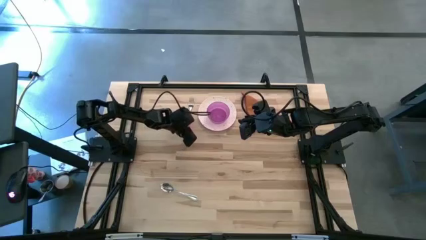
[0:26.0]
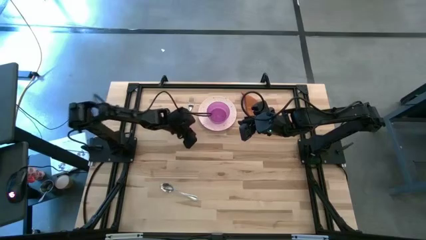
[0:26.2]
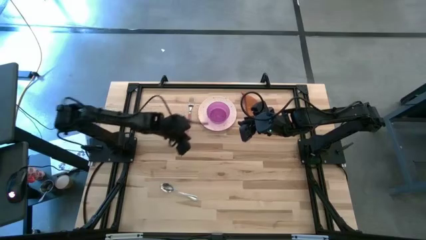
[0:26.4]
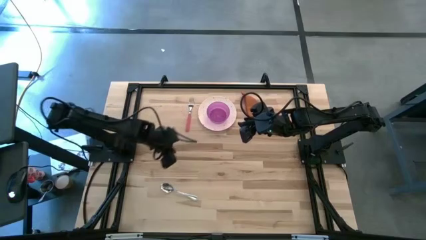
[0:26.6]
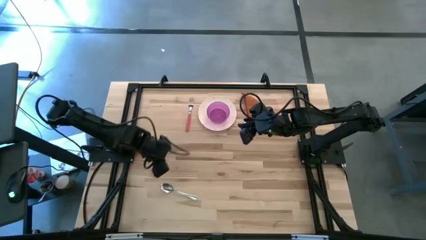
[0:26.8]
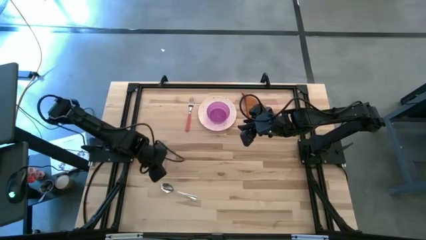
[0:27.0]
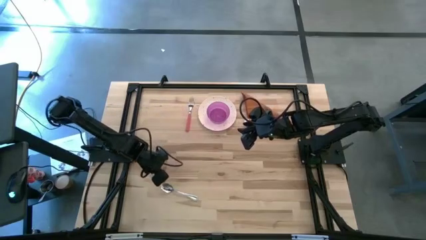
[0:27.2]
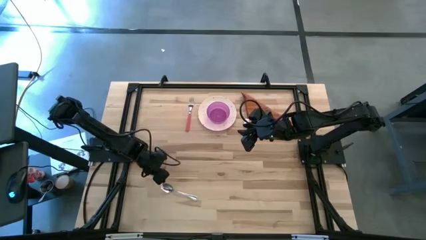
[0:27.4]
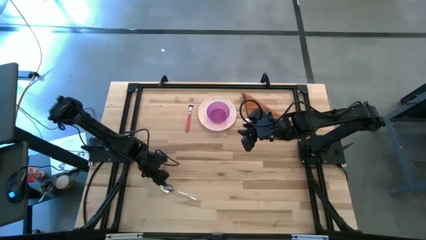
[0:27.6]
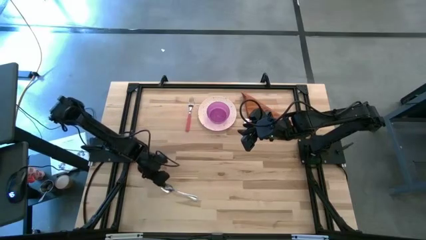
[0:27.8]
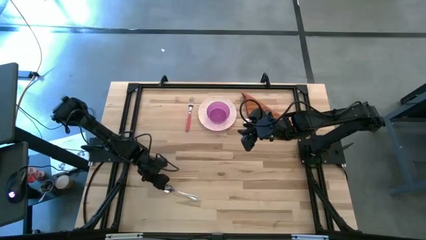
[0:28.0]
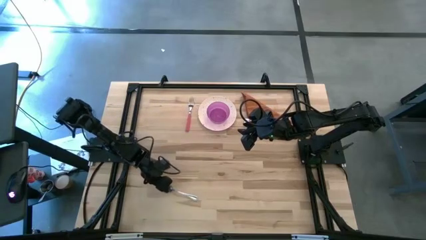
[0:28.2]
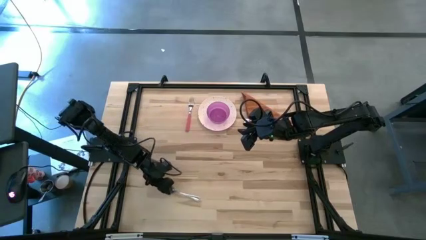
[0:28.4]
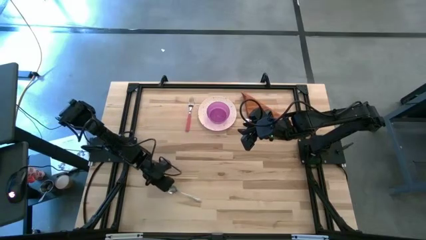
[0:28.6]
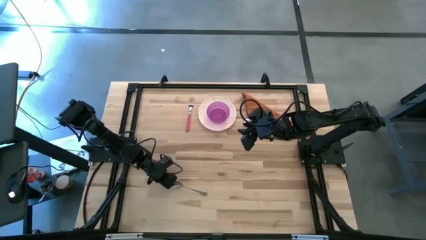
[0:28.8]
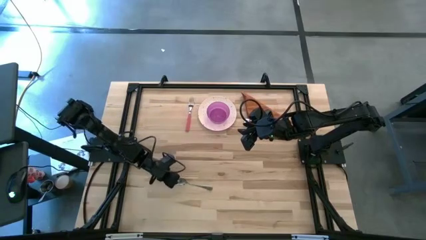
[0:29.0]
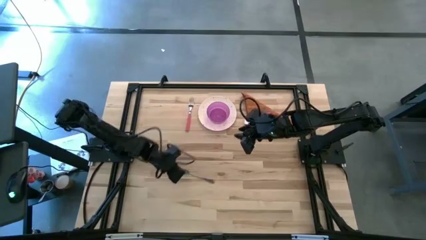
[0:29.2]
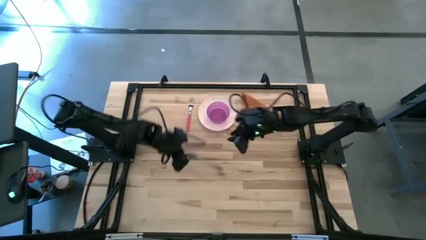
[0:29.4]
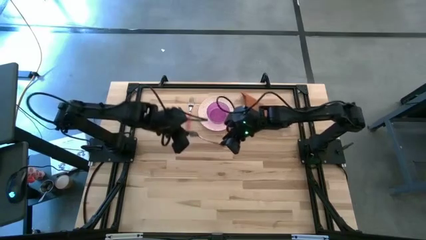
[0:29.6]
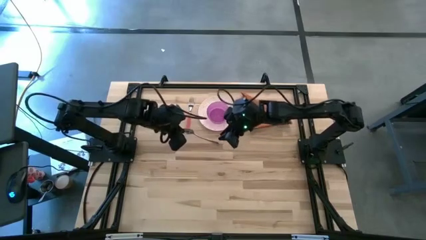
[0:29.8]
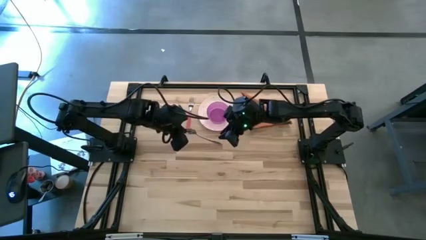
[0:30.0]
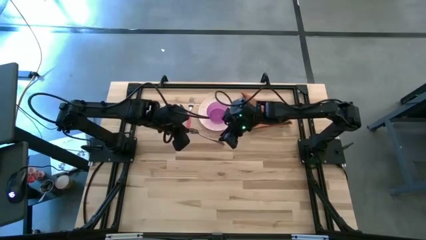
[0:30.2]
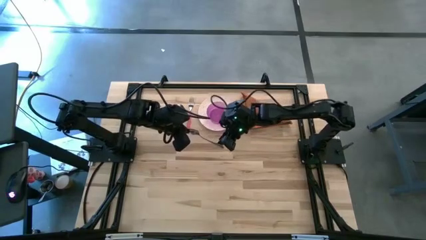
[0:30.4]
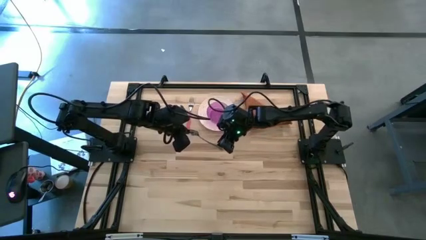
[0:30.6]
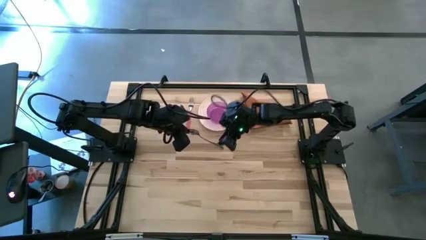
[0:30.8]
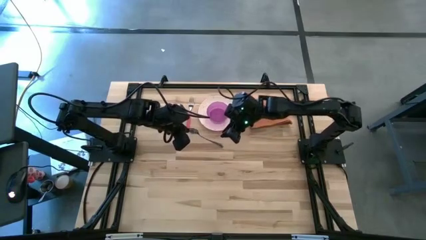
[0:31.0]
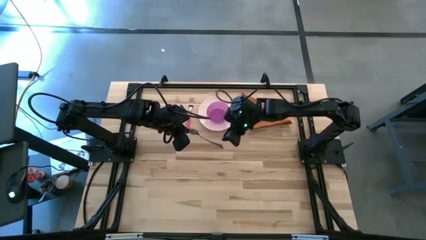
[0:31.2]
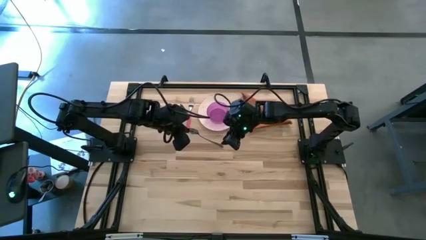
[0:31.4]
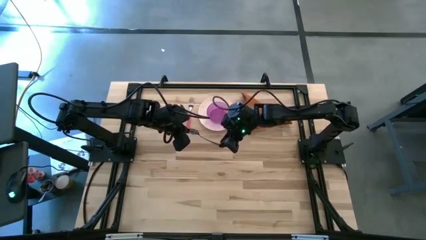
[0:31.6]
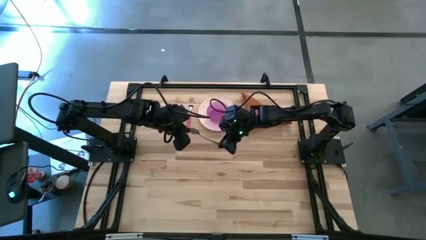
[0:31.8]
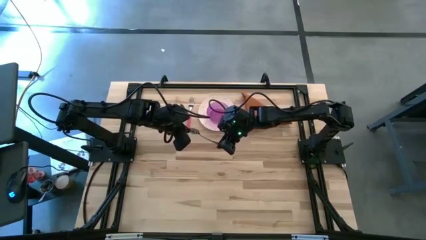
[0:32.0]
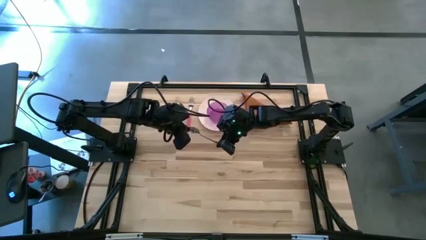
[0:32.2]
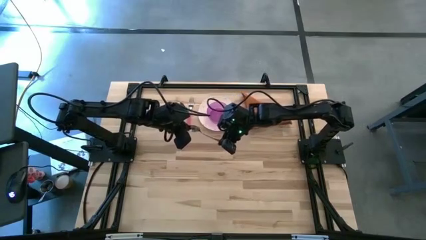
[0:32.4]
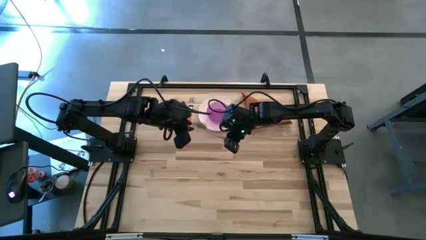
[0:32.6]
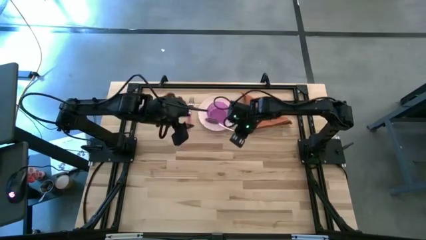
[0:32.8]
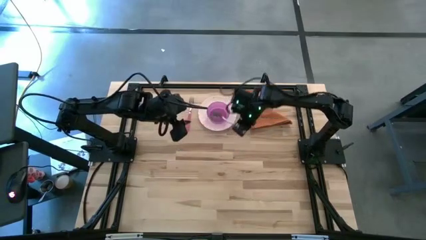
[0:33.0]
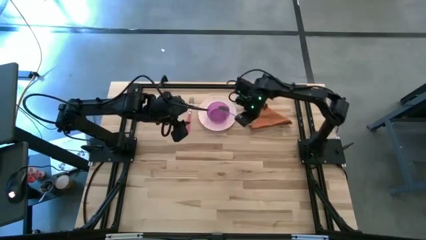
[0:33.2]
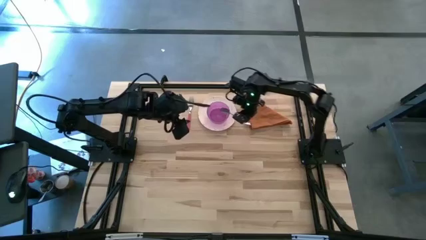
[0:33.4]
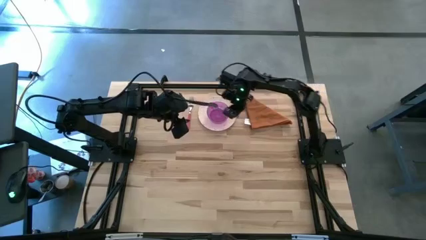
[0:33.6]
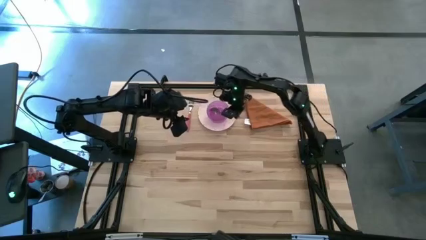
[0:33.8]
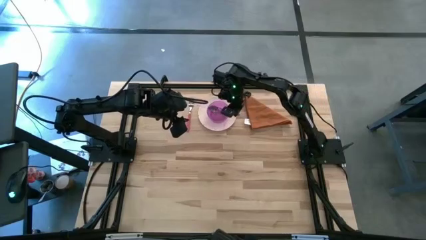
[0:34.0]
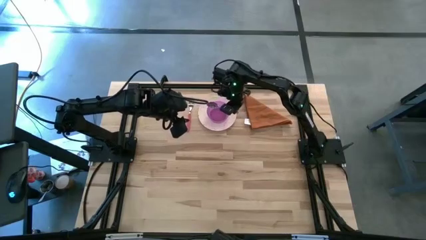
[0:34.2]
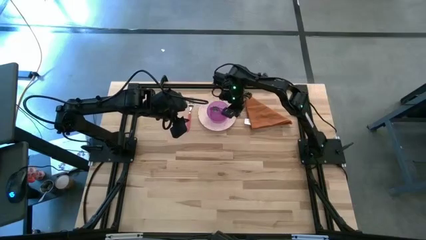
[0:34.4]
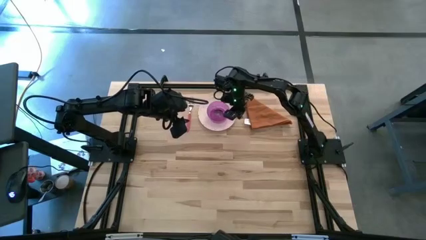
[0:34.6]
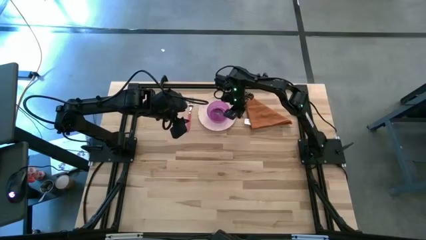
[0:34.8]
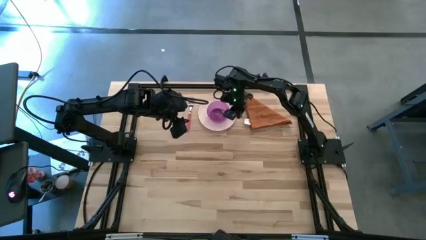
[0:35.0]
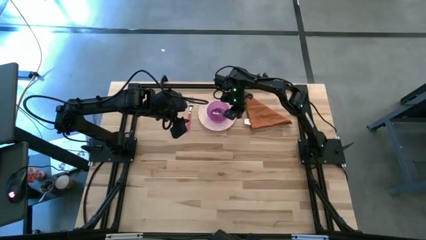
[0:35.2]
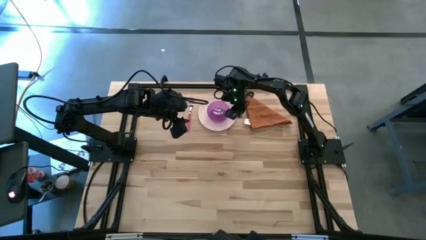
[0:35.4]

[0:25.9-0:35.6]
Task: Set table place
Put the silver spoon into the purple bowl

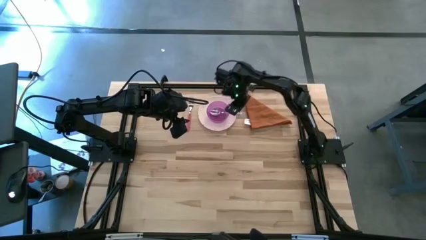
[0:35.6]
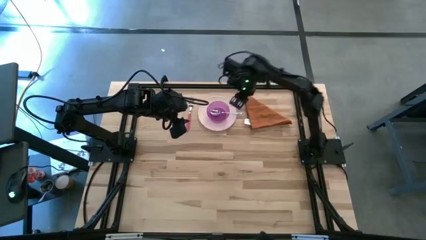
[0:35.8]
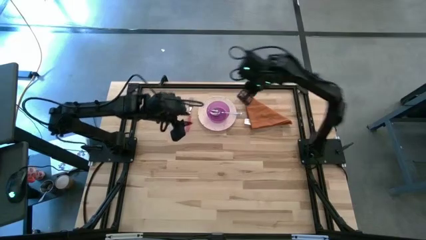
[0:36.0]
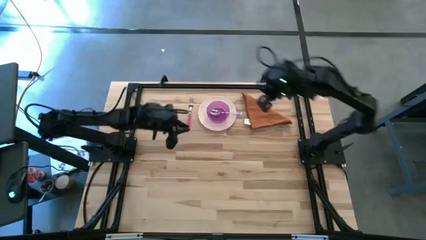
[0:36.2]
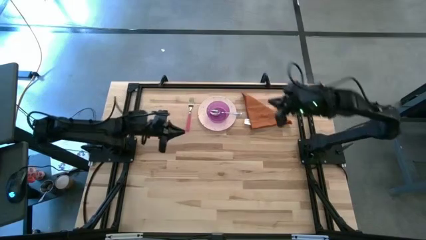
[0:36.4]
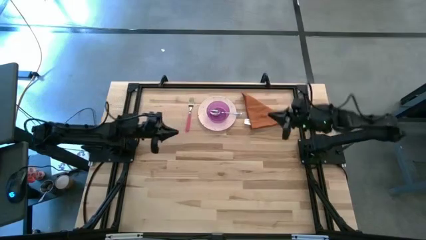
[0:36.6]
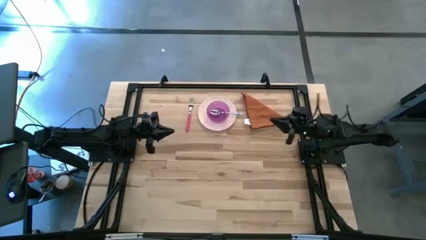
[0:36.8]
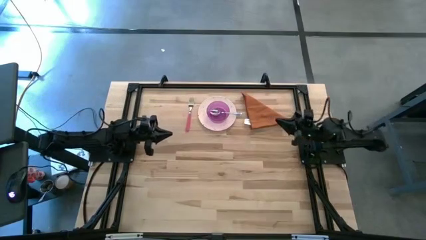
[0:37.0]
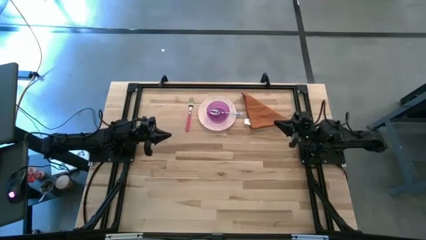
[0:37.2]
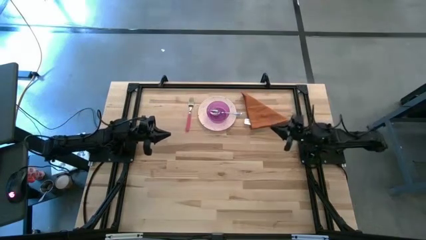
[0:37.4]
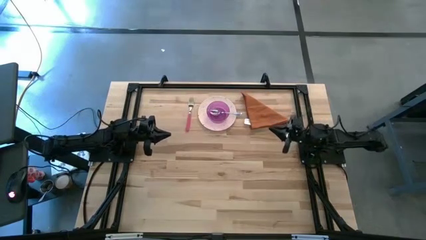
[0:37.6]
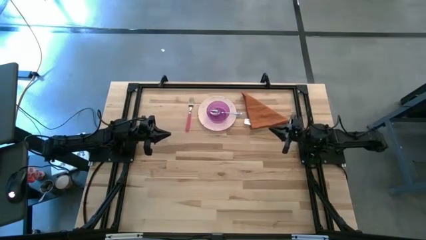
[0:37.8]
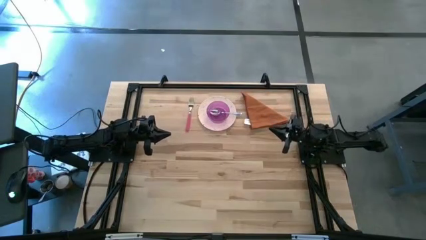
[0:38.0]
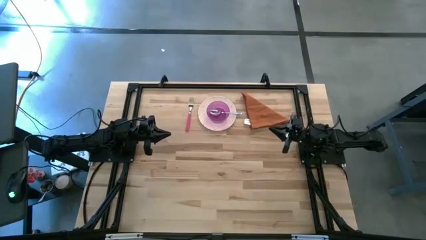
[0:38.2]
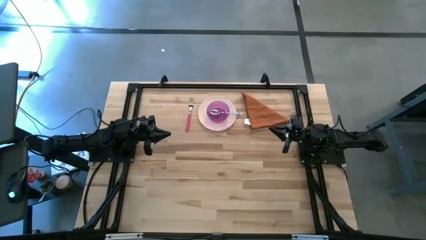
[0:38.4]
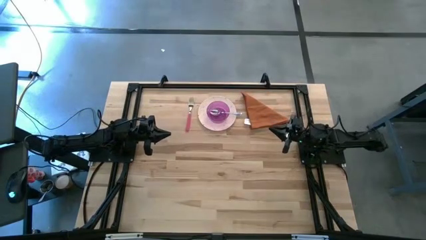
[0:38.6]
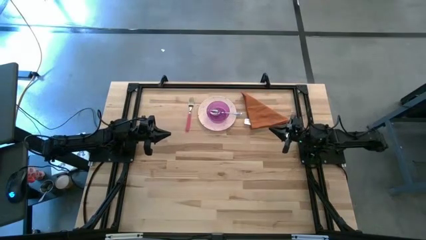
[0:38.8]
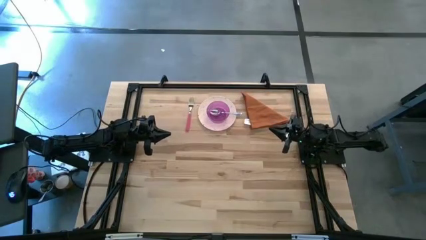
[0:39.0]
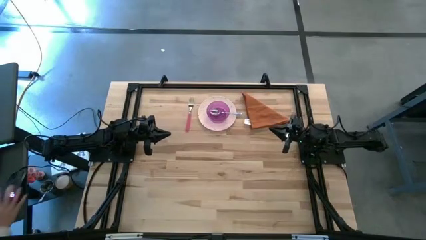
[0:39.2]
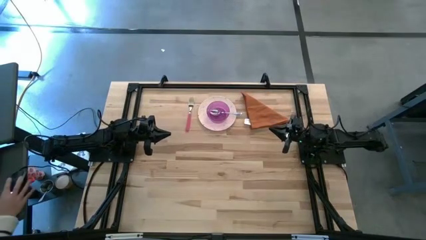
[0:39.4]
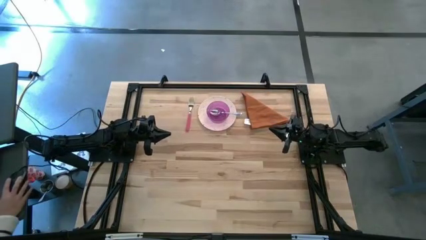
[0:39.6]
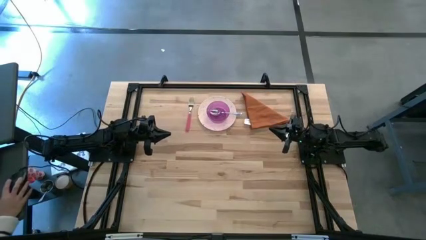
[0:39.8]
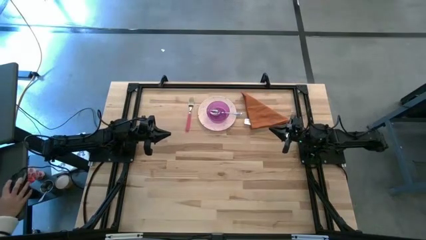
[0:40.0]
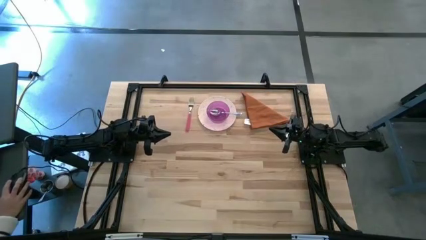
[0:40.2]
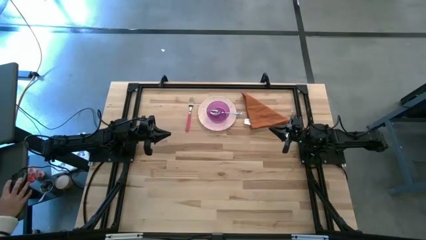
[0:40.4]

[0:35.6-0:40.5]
Return to Home Position
